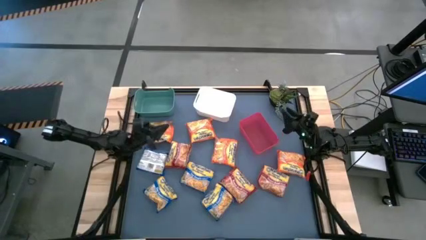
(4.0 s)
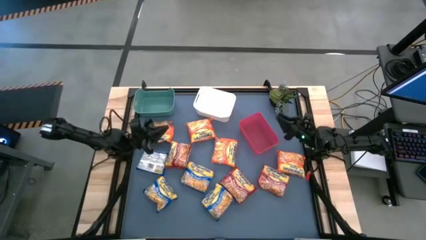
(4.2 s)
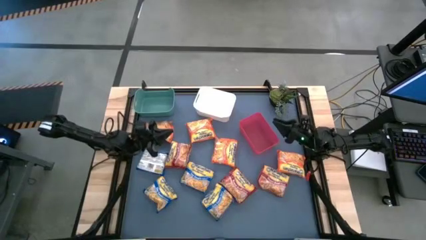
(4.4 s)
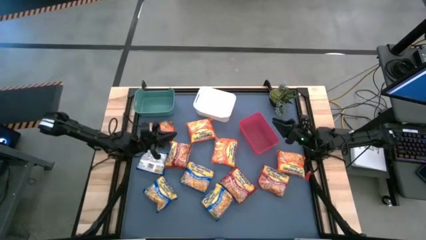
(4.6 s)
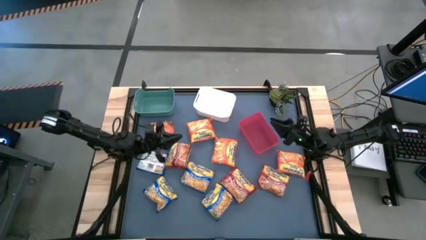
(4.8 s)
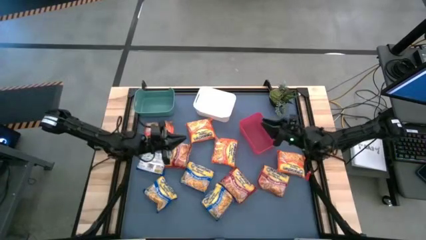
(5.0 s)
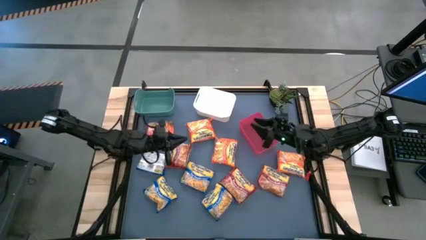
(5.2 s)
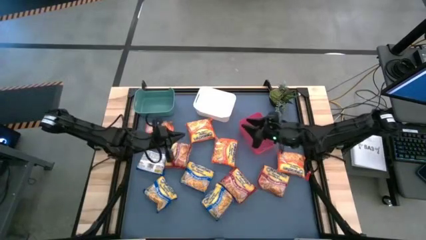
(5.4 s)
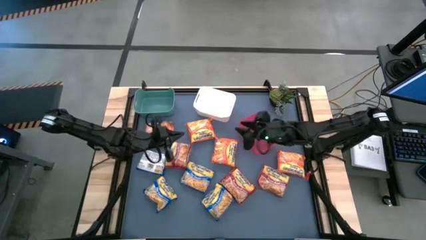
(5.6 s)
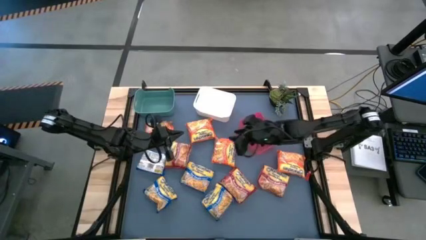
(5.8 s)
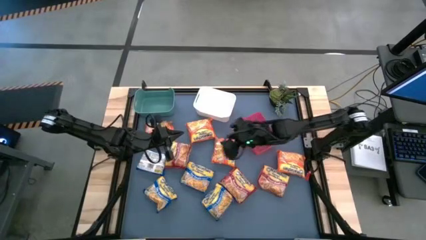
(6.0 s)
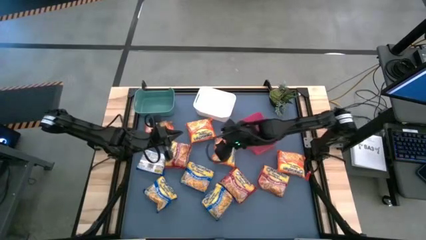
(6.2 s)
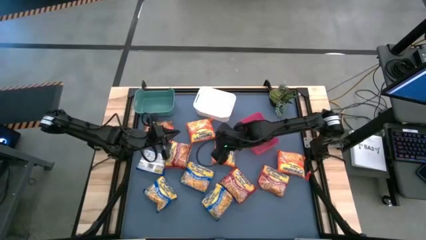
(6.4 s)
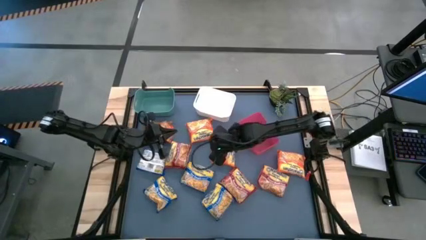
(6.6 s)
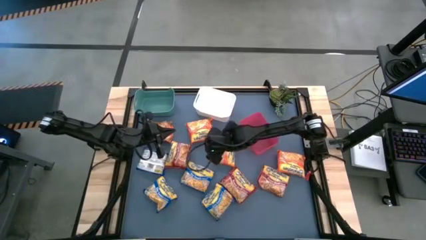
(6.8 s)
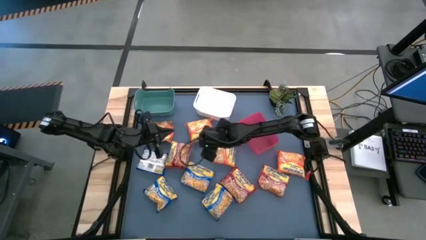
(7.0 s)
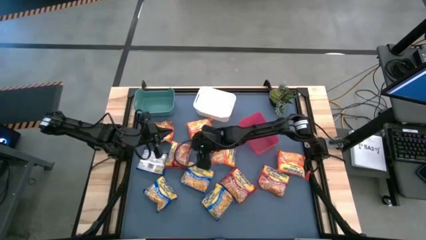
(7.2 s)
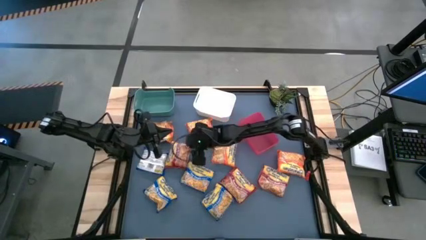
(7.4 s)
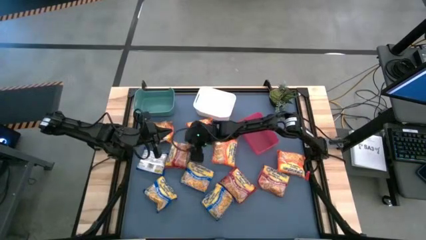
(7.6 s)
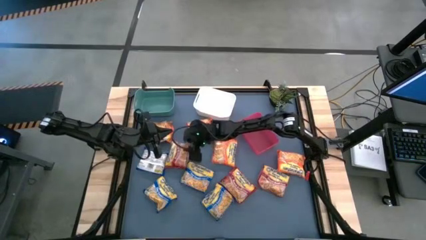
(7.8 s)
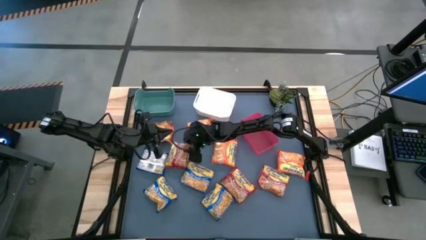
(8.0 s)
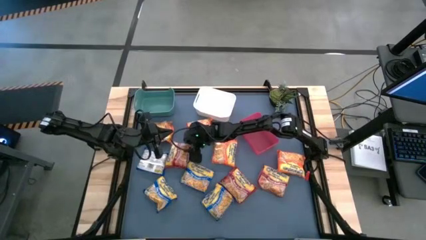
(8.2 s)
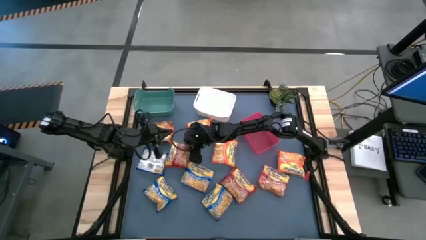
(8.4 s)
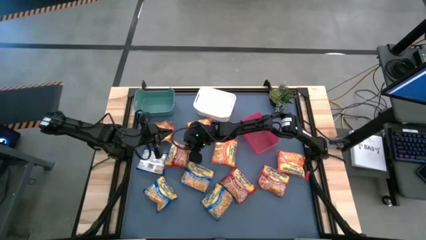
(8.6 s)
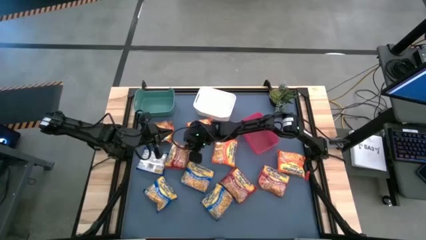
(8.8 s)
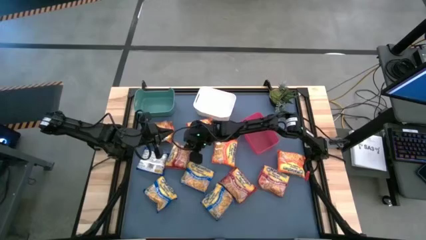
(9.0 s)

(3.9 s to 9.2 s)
Task: Sort Maruchan noodles
Put the red noodle pack into the pink bin

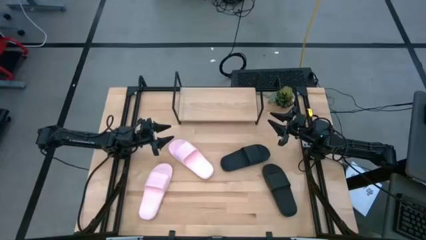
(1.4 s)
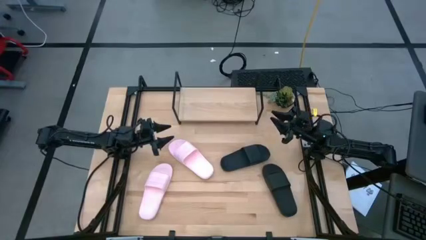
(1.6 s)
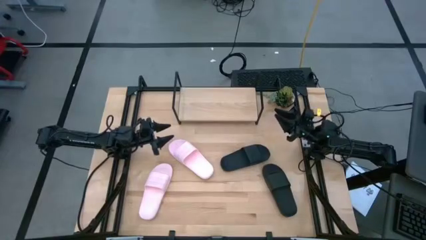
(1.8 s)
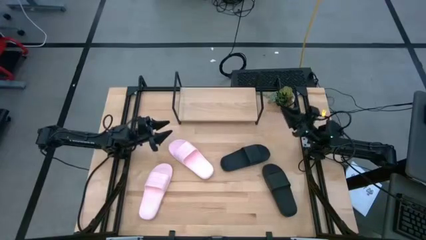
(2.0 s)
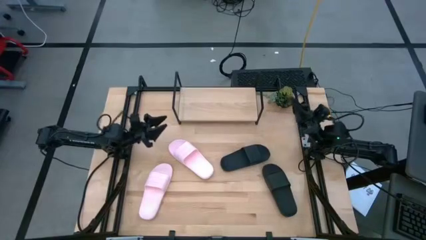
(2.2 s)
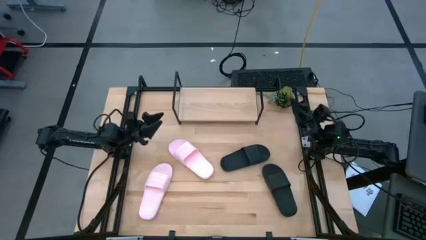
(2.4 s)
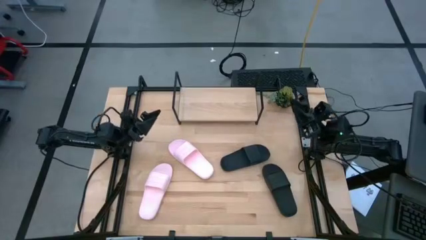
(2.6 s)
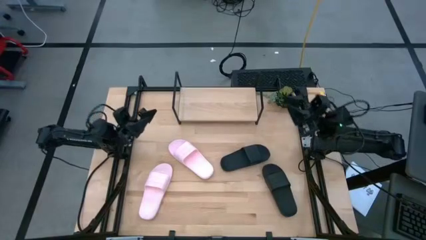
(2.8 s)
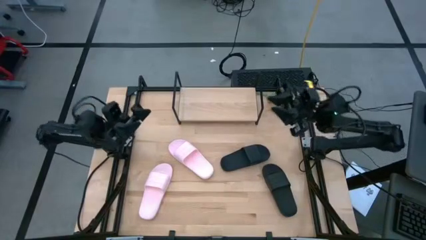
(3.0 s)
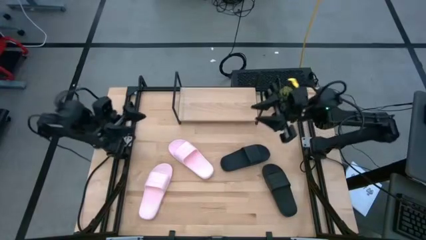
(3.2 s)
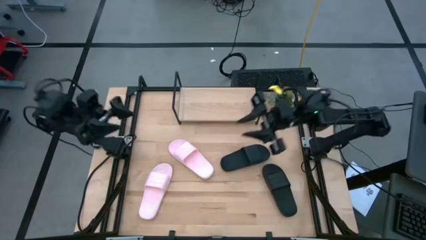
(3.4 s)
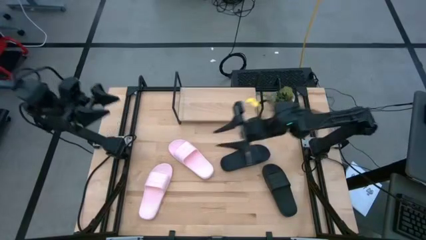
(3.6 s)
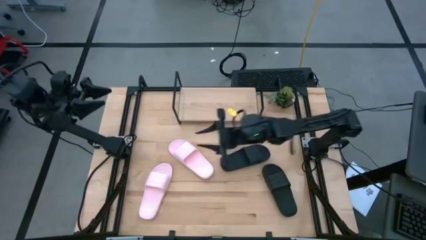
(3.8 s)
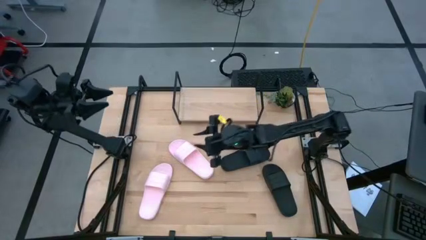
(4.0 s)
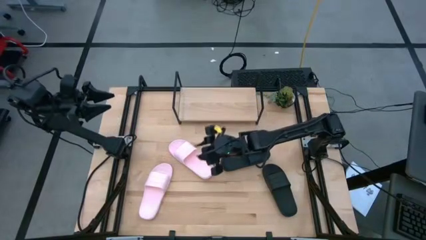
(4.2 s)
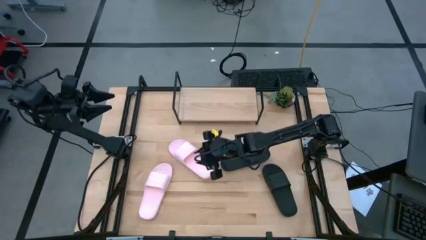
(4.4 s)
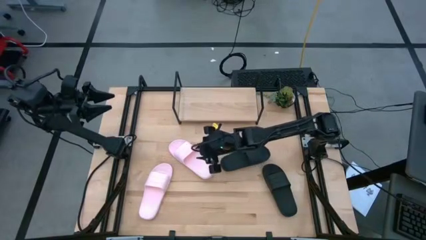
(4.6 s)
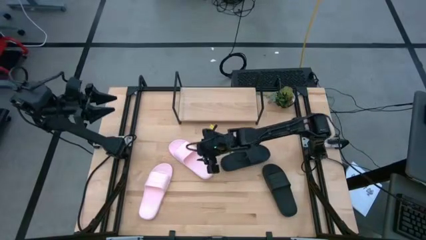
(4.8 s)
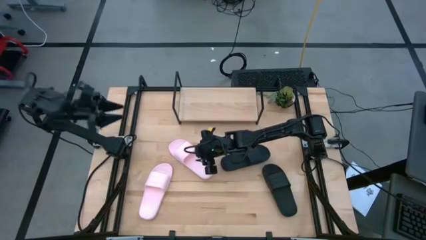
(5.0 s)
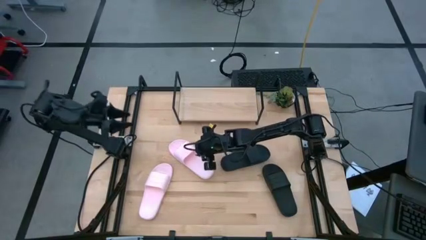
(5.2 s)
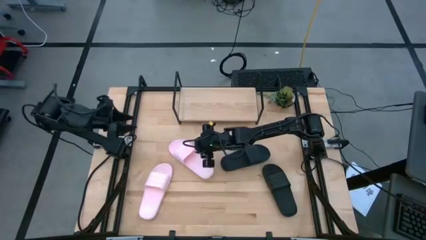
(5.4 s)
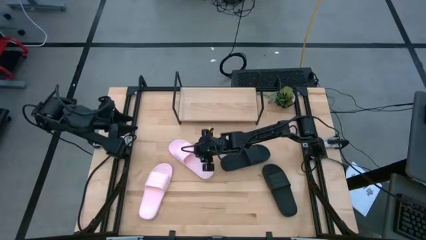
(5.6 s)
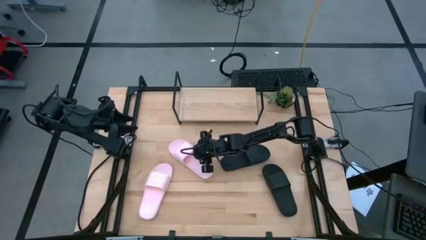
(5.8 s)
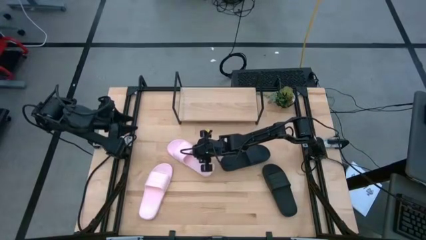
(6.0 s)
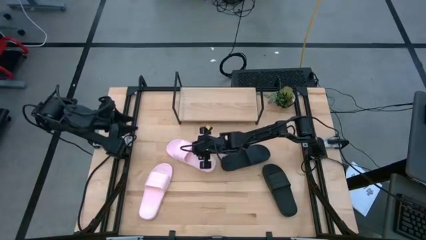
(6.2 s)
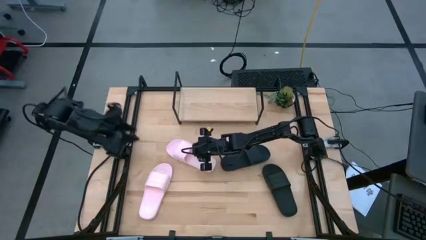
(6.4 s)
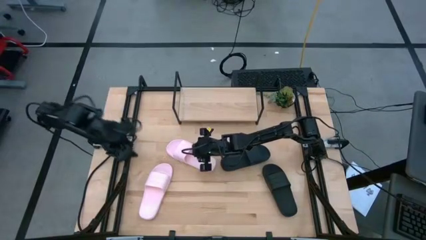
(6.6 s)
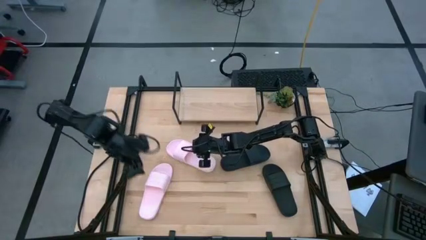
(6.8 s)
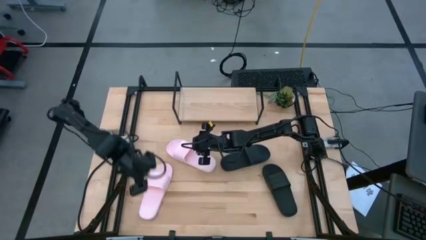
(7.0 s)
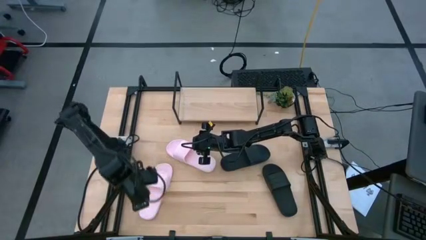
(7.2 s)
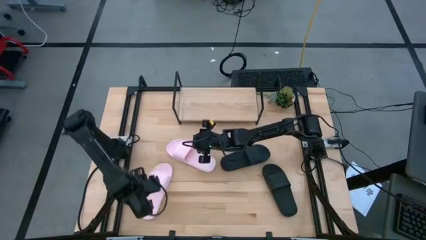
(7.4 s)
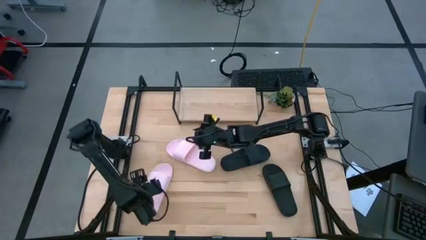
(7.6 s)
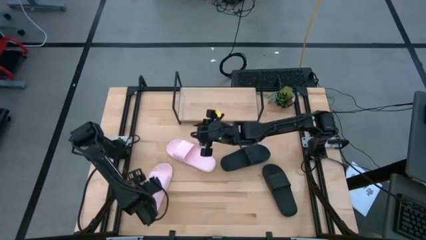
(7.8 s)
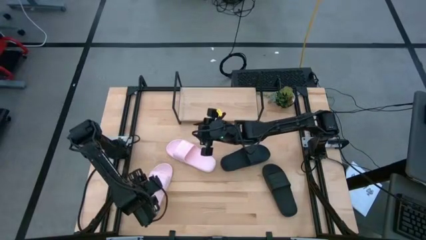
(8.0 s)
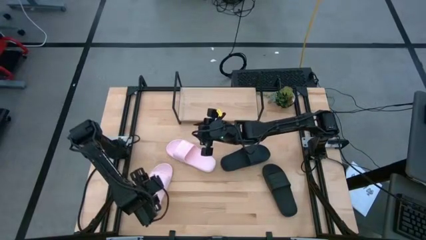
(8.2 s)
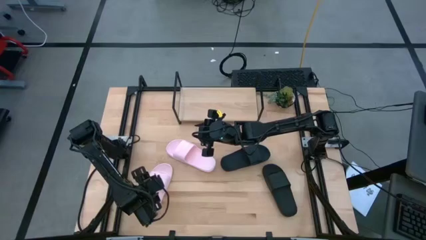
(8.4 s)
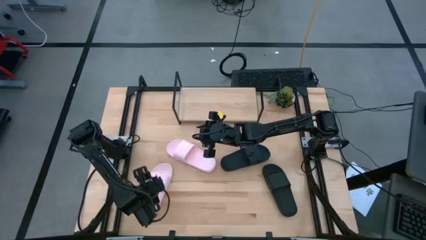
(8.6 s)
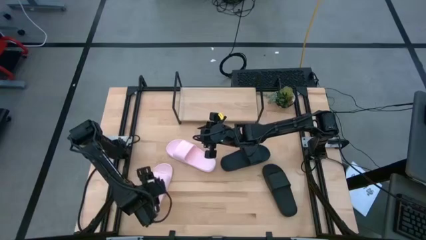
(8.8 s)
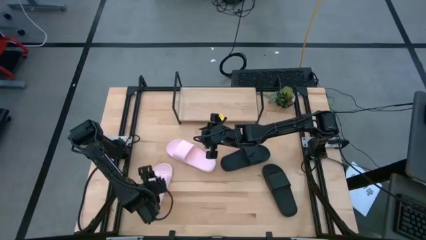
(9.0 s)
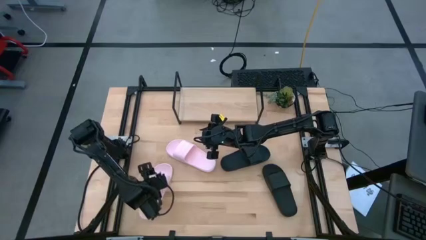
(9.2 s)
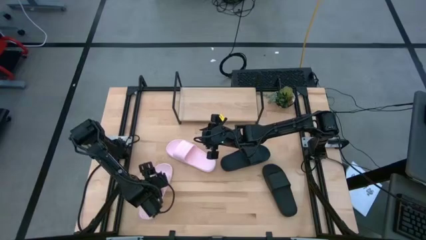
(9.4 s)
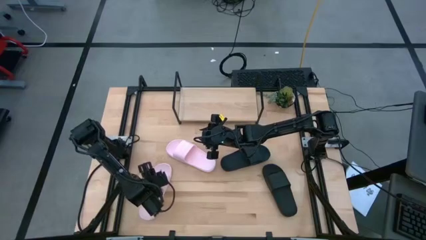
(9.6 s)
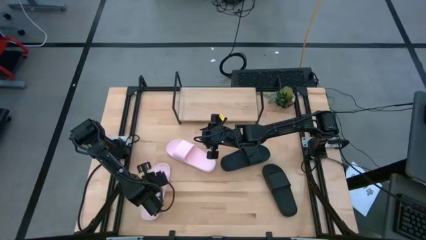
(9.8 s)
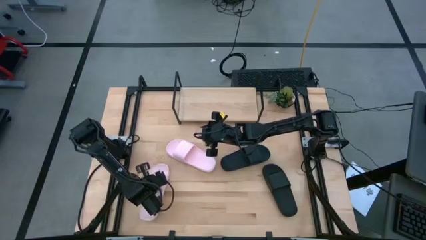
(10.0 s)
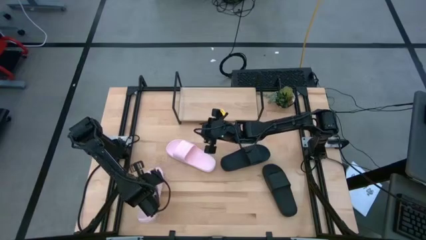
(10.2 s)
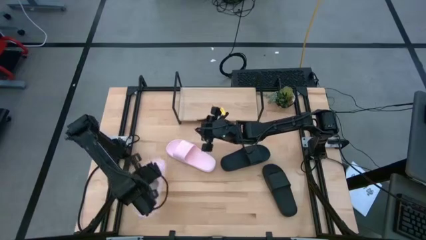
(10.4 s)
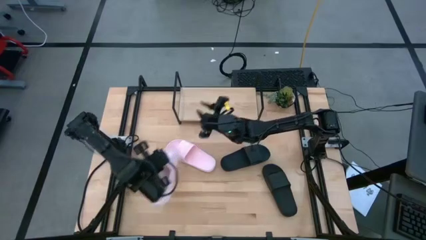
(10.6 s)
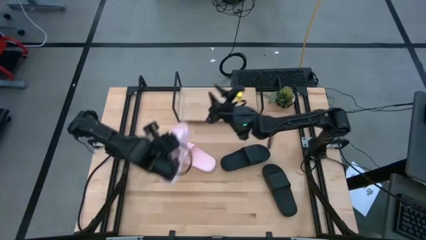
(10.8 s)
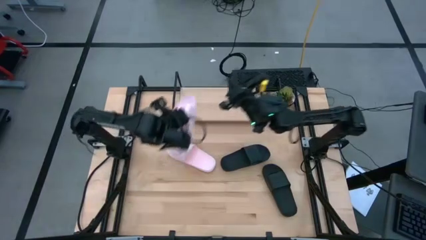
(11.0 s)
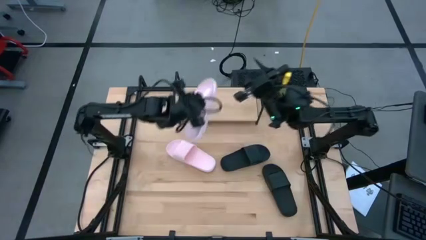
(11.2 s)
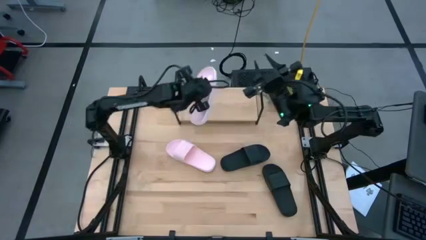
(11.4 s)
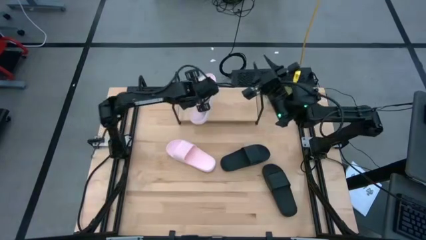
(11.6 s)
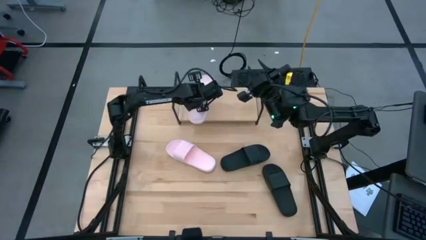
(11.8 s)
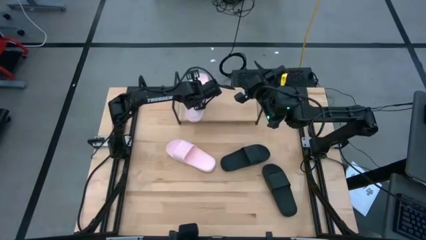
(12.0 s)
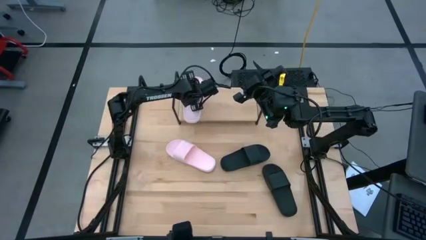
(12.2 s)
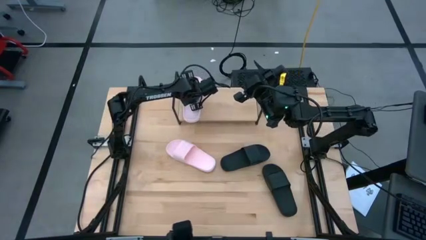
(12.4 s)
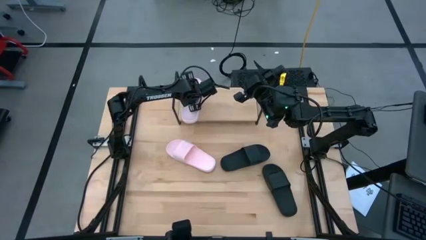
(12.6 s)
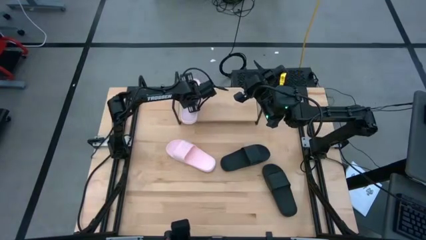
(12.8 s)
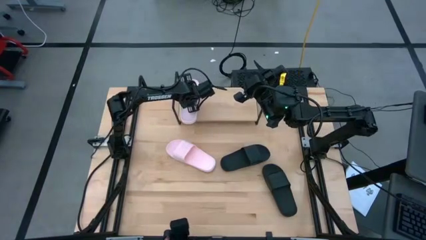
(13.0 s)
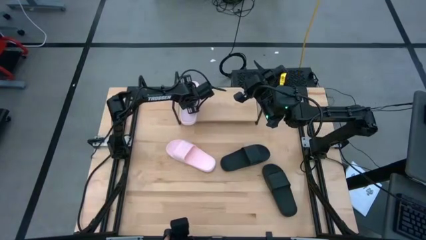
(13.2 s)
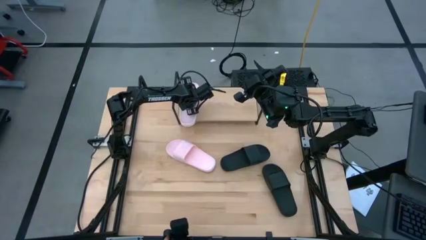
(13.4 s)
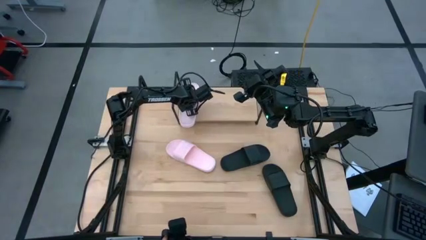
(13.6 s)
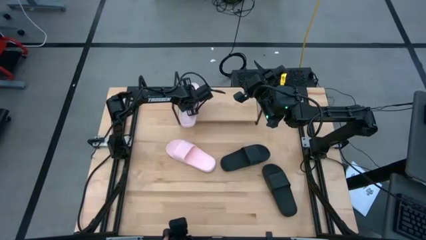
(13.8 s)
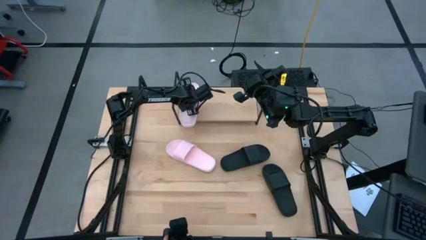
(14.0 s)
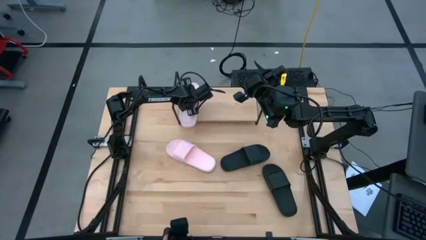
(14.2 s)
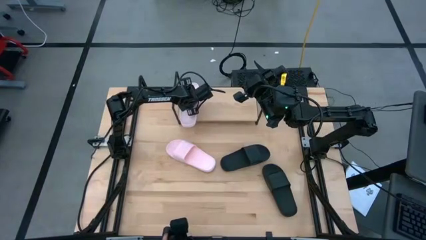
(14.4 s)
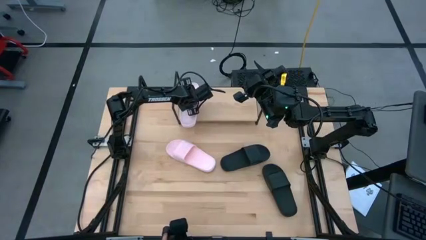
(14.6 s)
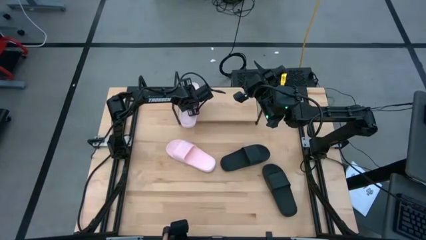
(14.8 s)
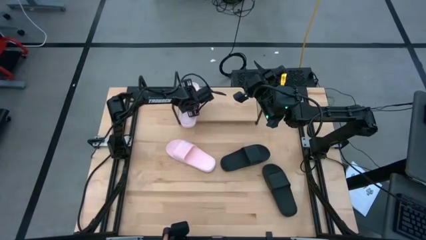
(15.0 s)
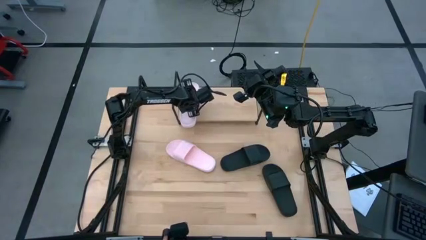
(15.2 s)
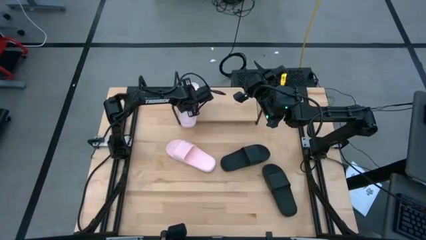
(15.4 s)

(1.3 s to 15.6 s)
Task: Pick and place slides into the shelf
Put the left pink slipper on the shelf
